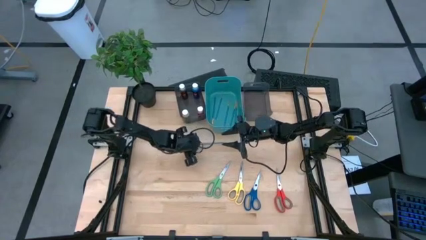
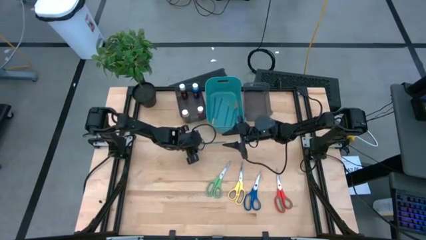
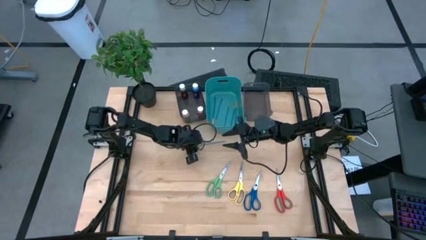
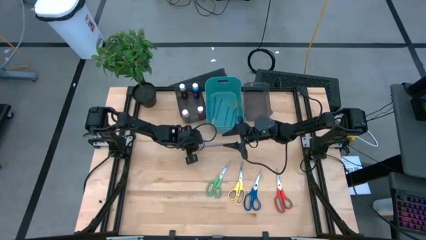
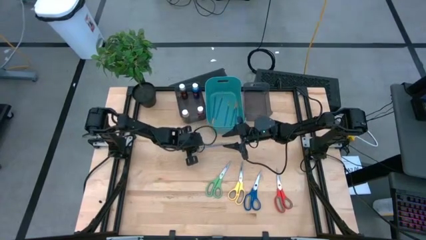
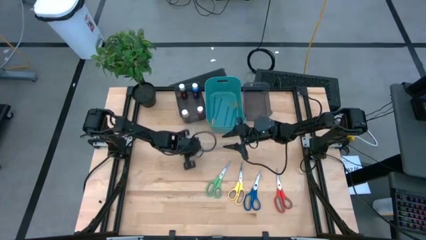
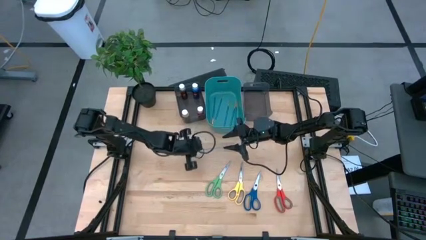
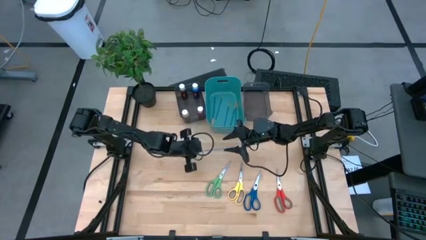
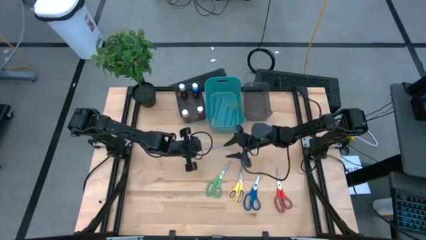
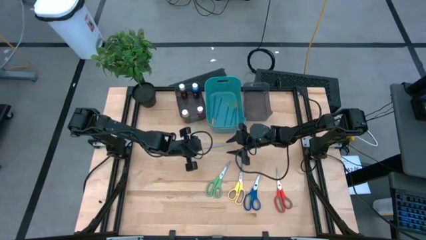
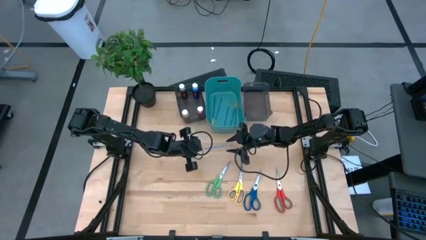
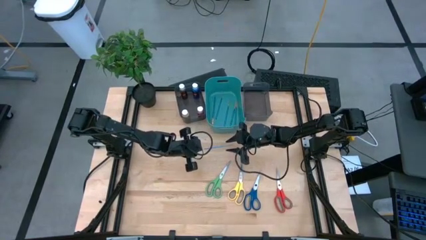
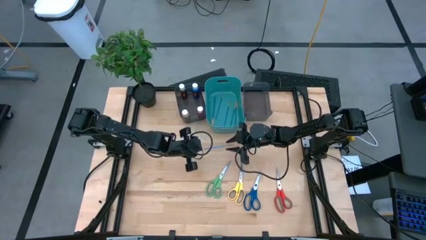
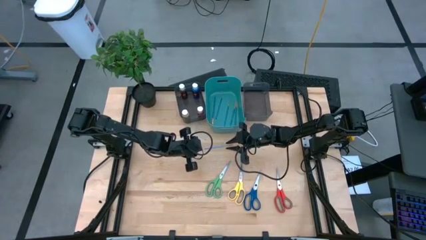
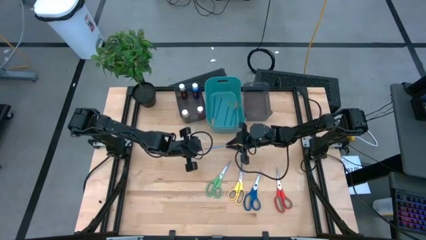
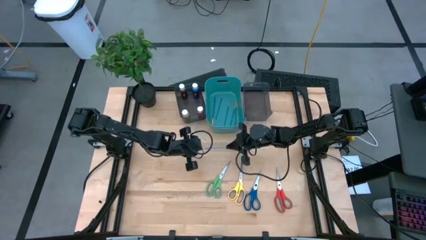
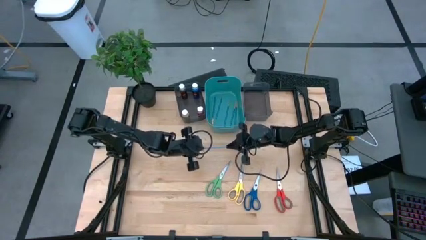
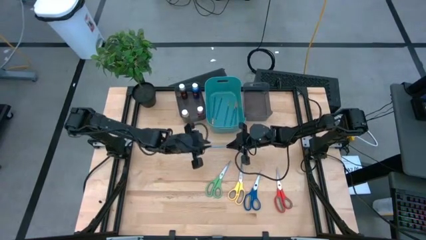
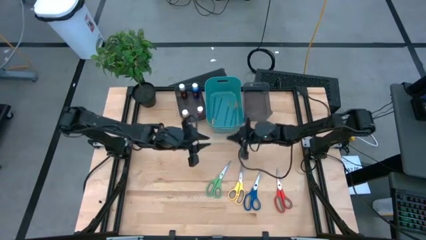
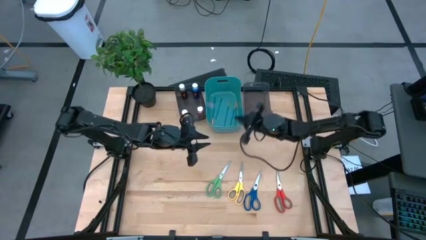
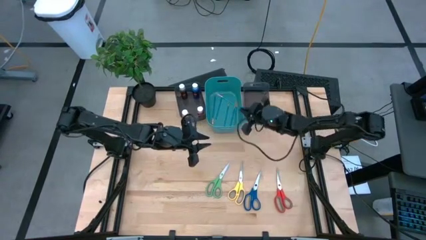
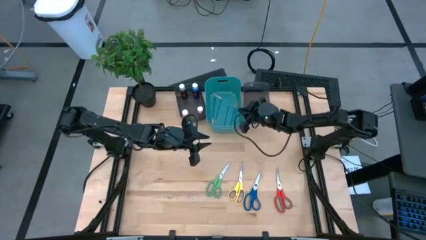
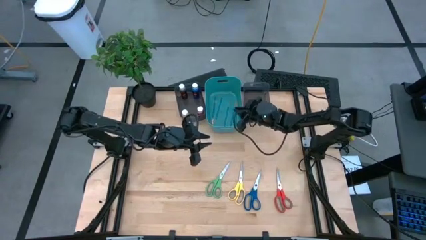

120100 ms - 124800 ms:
Task: Pick & Place Paint Supplies
Put the blue paint brush into the blue bin

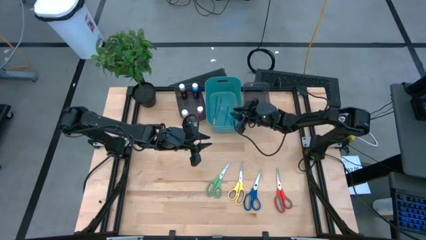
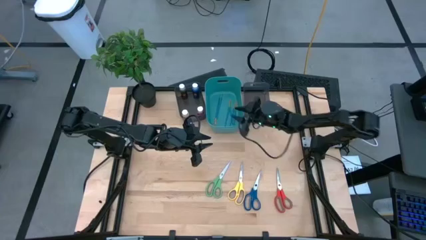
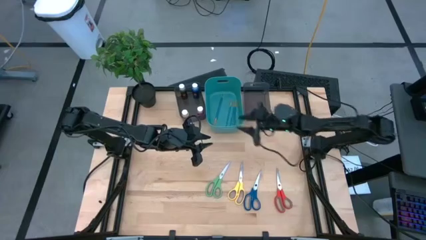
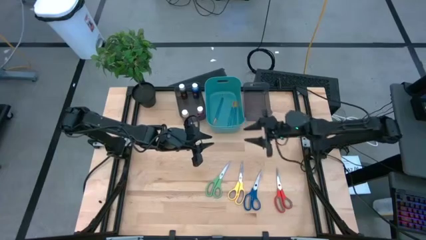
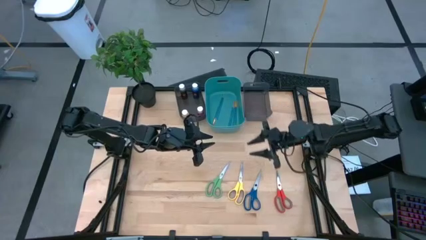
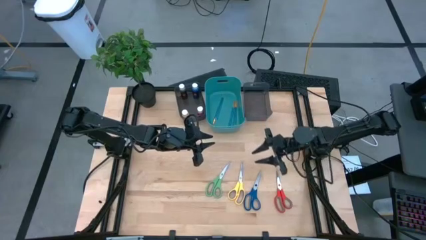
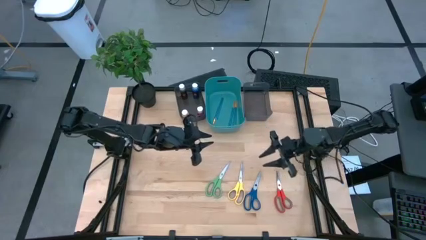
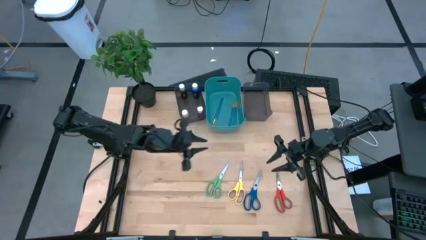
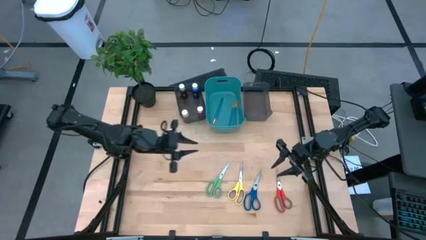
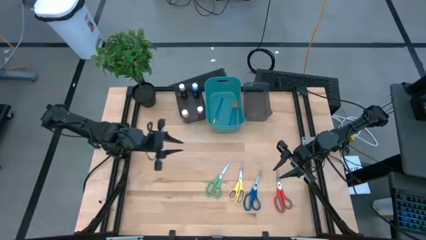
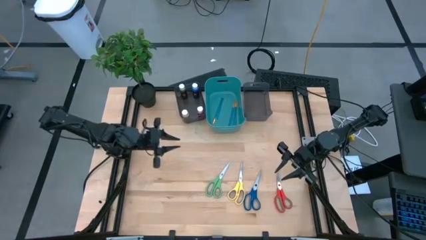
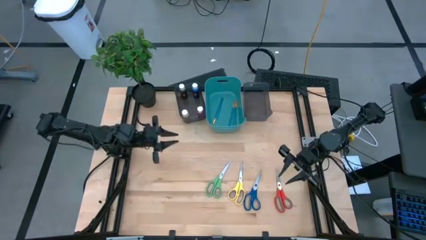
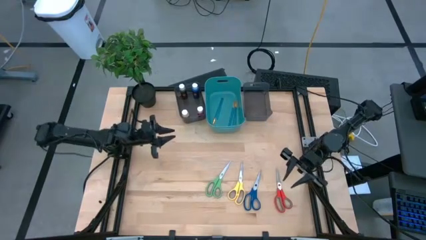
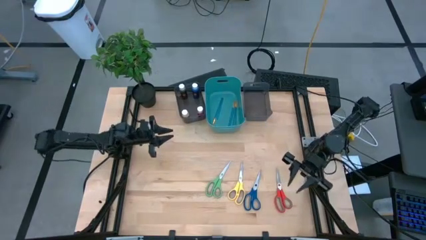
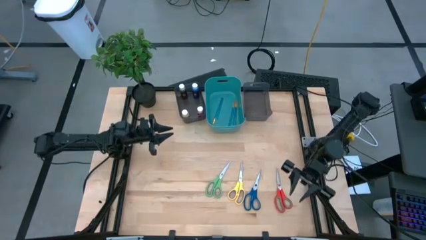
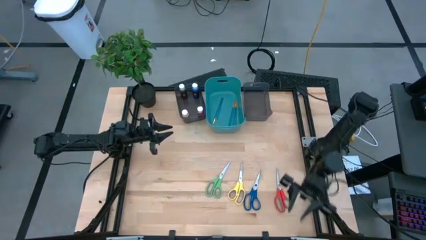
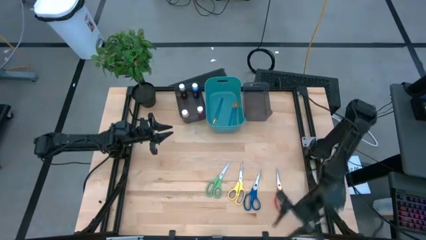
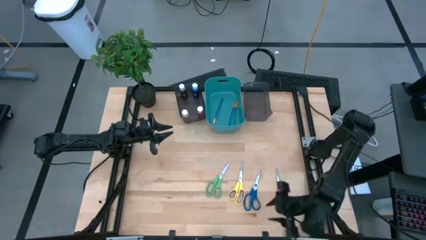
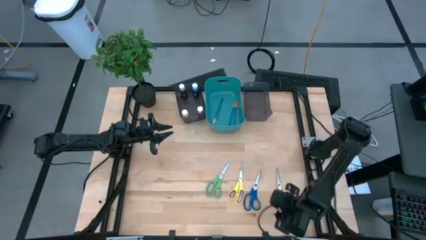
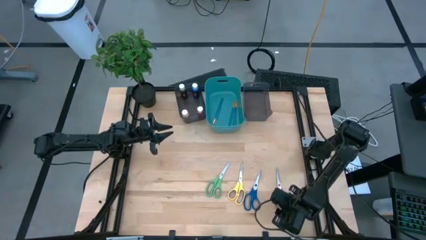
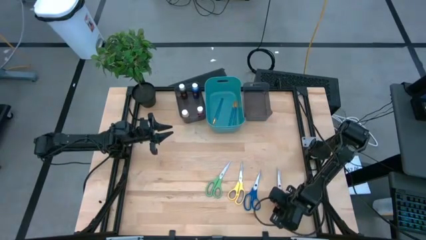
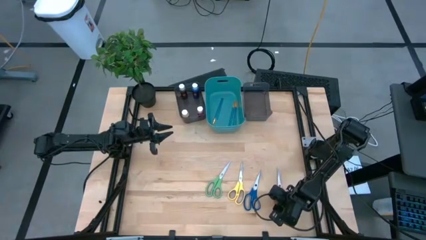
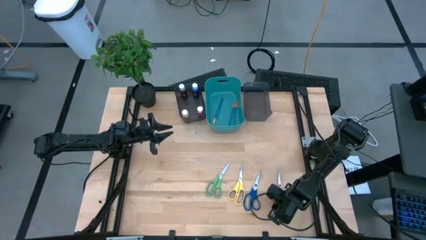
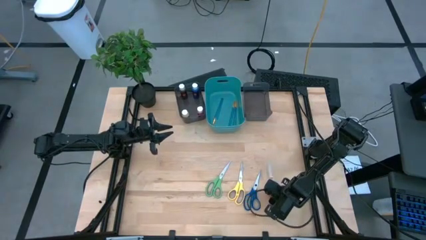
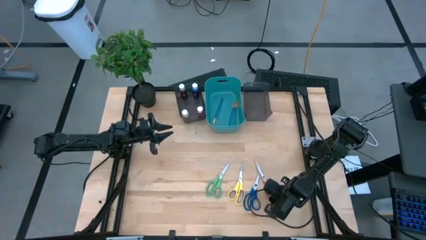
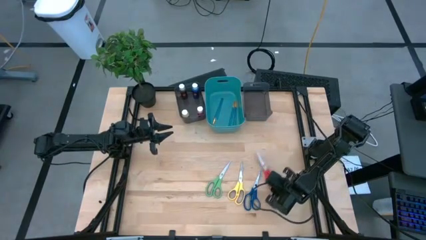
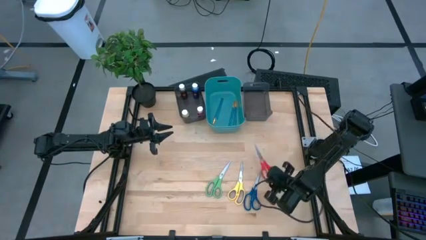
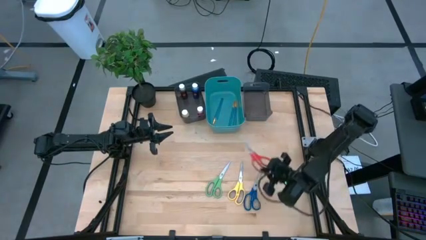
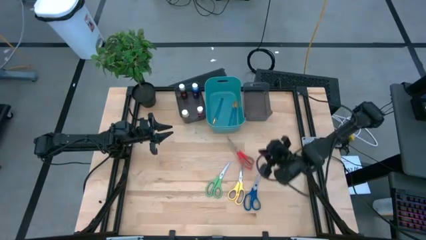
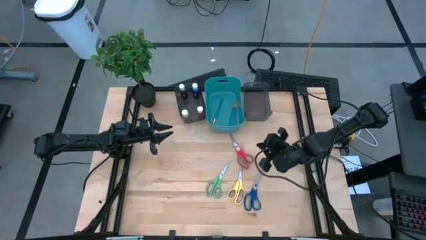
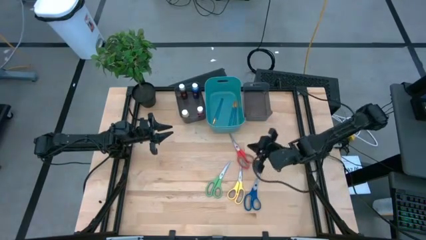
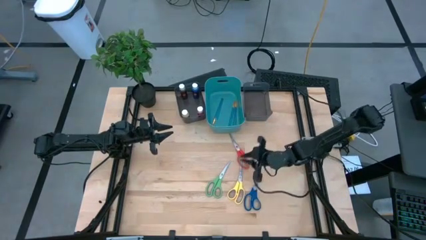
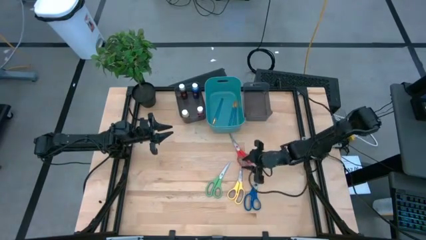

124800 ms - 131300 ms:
Put the red scissor into the right black bin

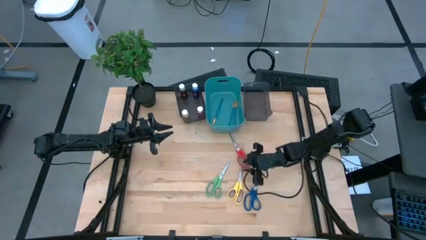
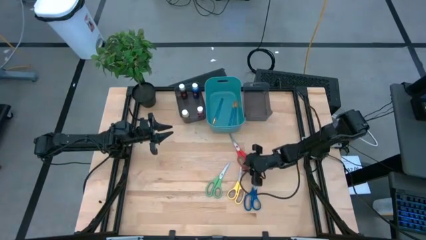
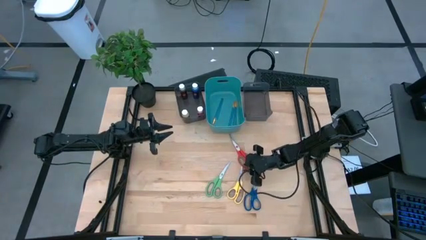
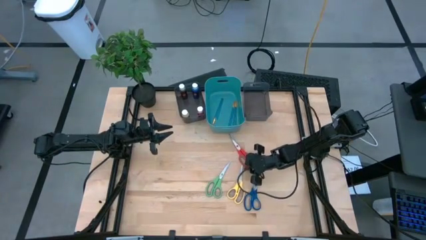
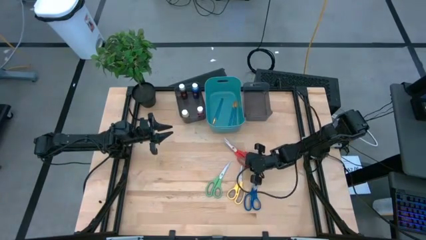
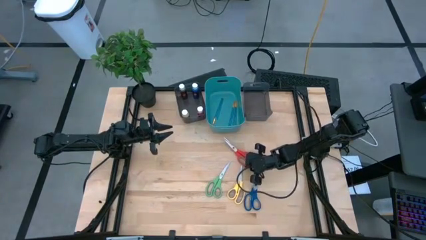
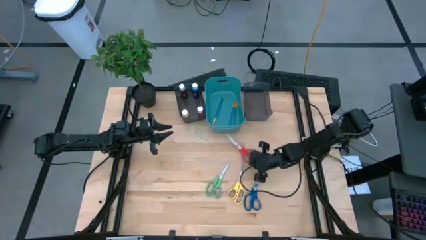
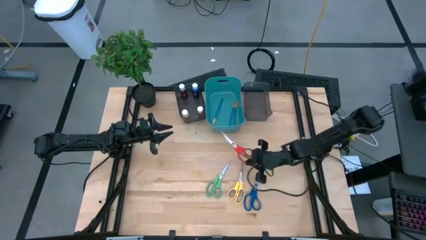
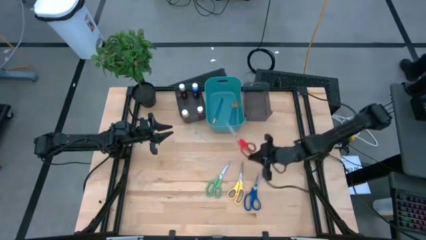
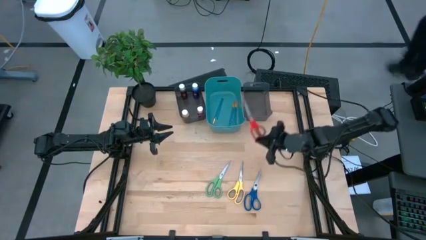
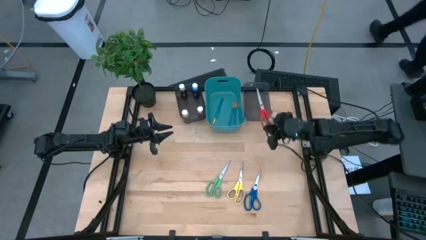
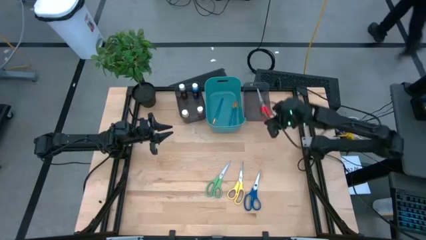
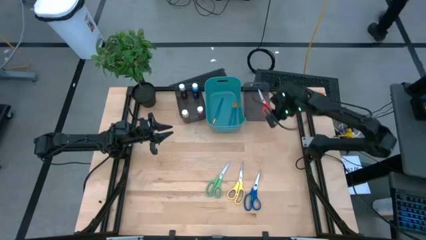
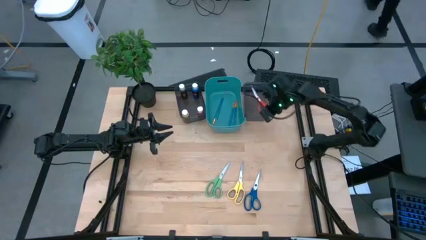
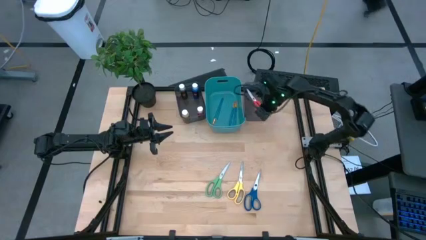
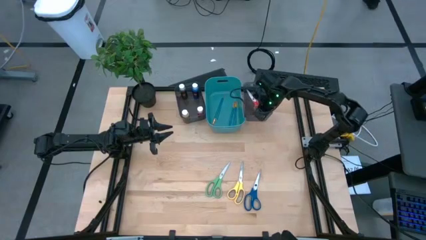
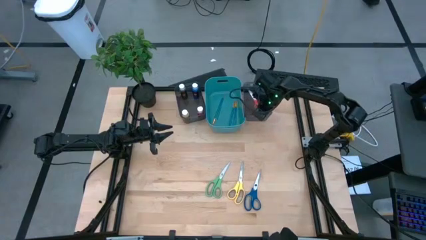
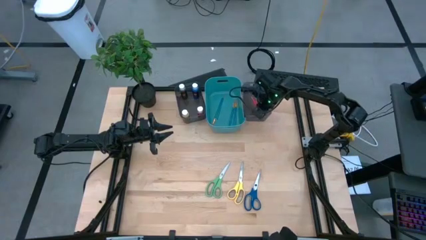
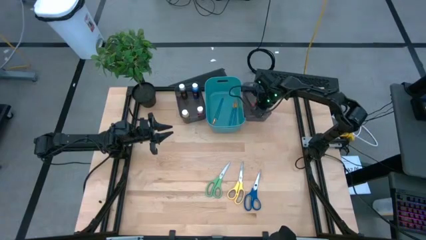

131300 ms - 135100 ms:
Put the red scissor into the right black bin
